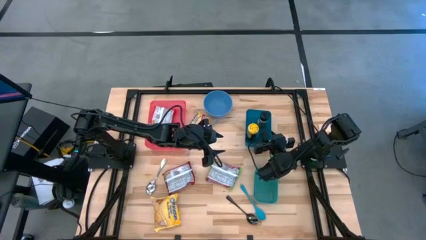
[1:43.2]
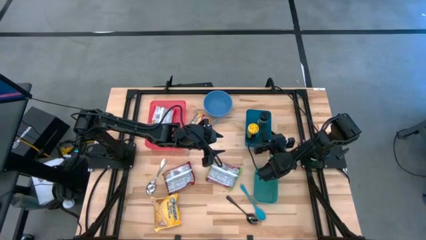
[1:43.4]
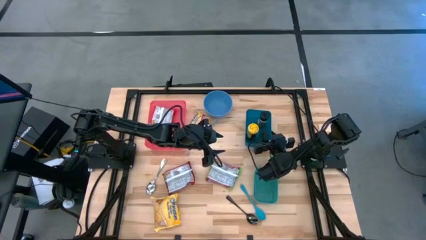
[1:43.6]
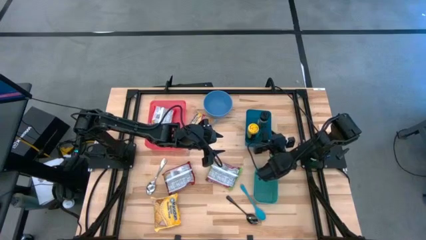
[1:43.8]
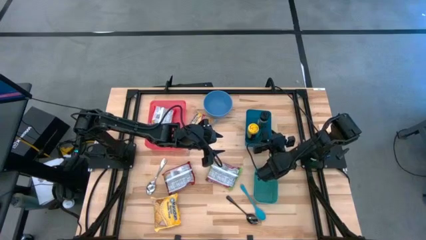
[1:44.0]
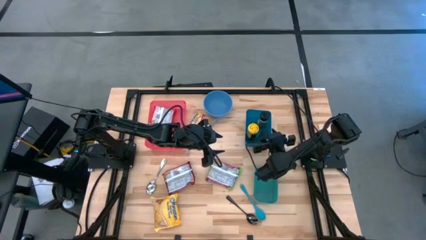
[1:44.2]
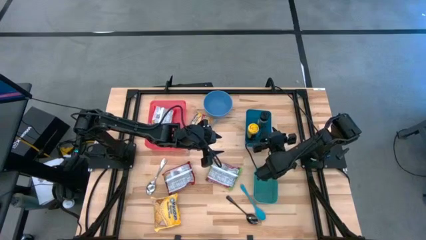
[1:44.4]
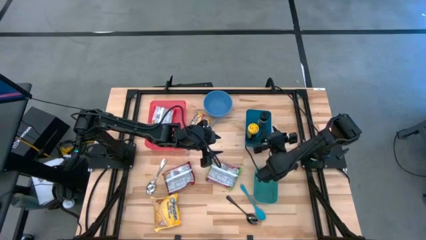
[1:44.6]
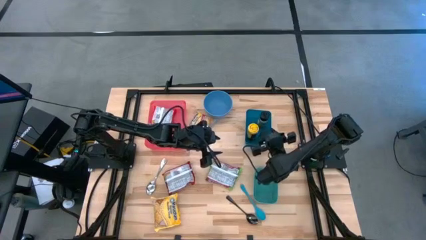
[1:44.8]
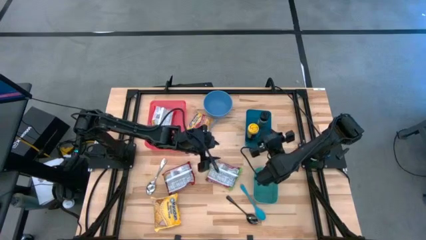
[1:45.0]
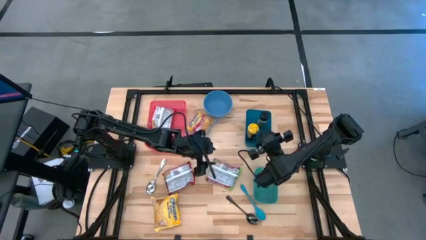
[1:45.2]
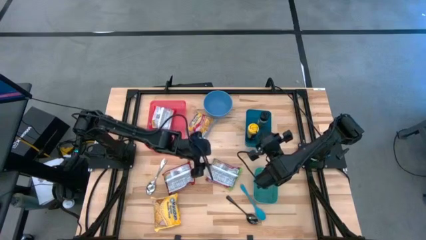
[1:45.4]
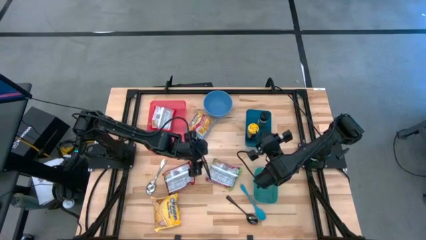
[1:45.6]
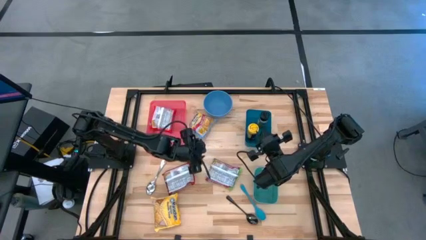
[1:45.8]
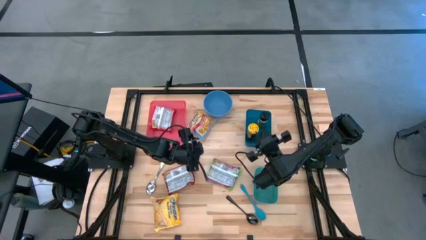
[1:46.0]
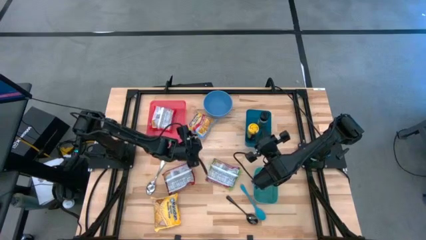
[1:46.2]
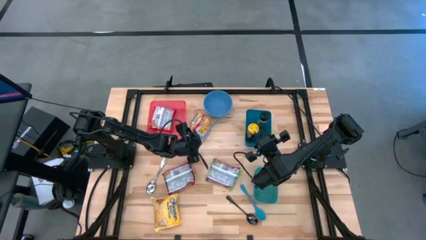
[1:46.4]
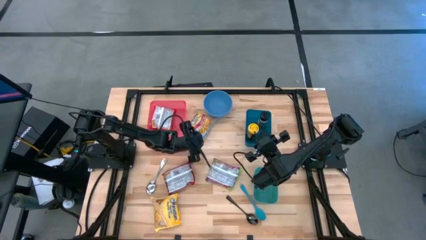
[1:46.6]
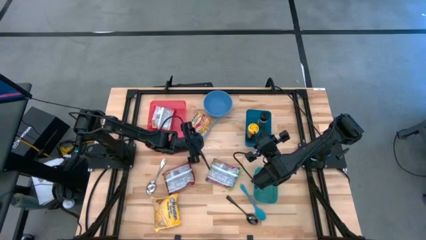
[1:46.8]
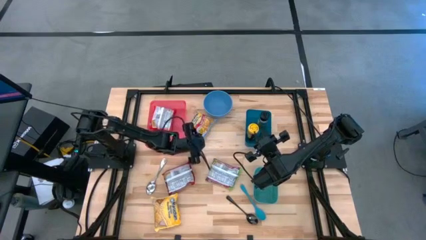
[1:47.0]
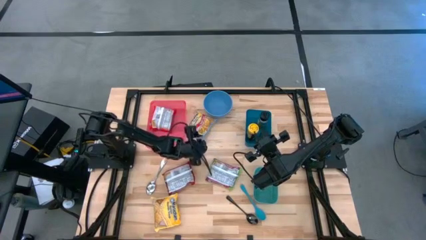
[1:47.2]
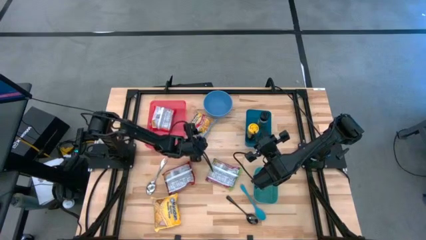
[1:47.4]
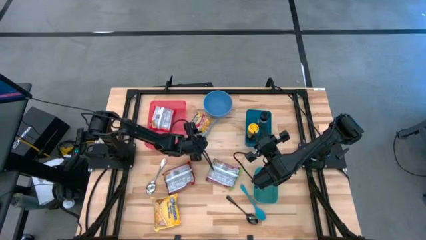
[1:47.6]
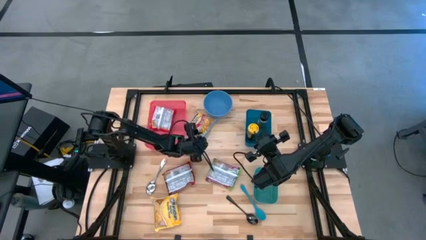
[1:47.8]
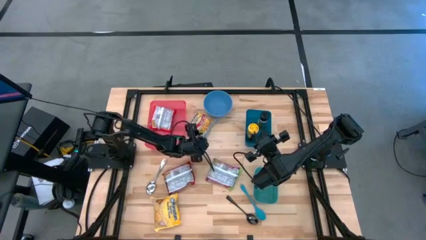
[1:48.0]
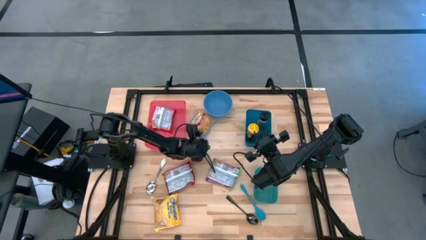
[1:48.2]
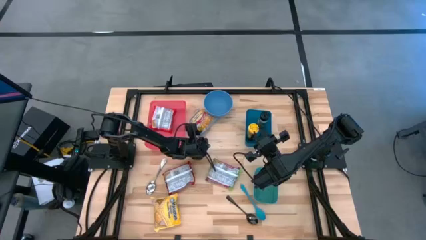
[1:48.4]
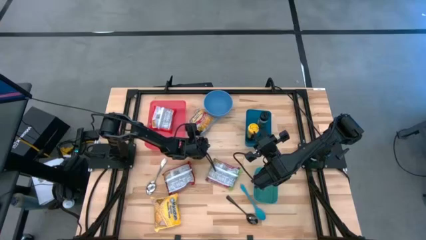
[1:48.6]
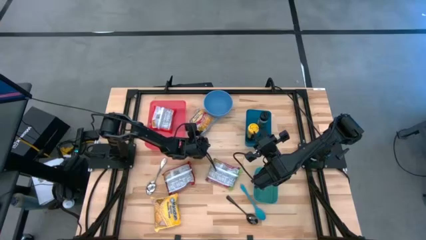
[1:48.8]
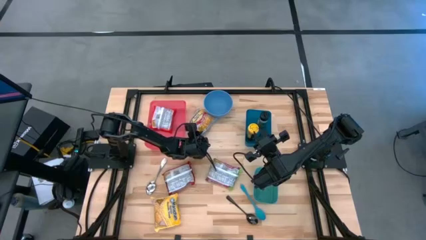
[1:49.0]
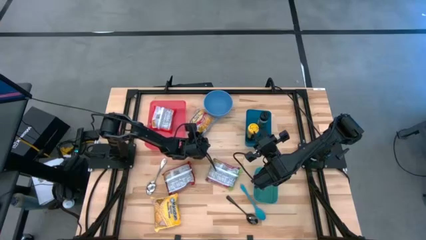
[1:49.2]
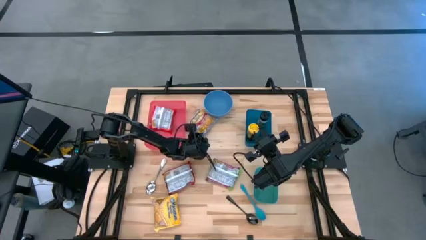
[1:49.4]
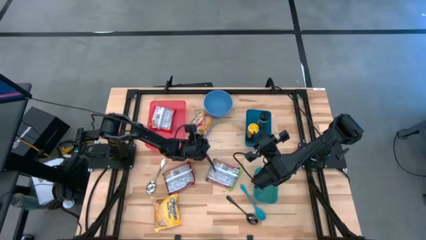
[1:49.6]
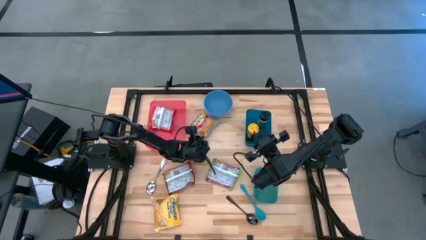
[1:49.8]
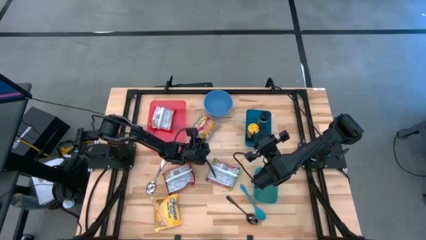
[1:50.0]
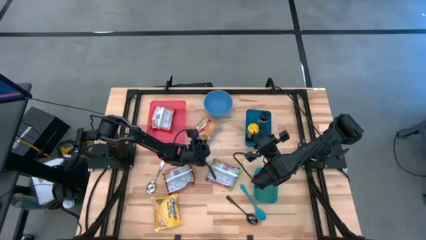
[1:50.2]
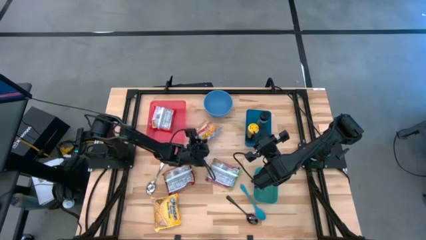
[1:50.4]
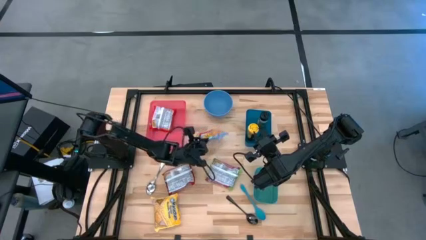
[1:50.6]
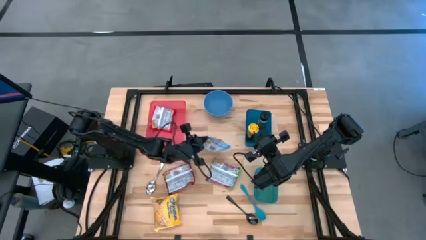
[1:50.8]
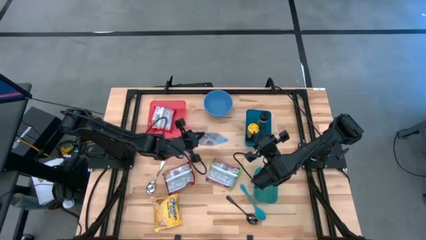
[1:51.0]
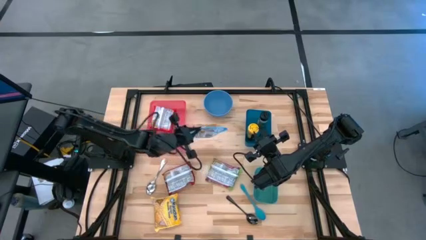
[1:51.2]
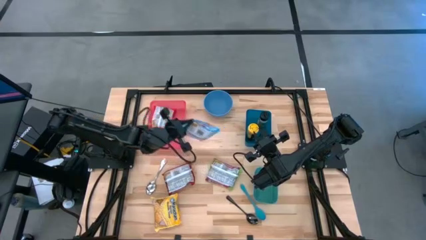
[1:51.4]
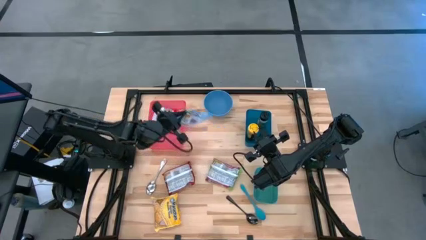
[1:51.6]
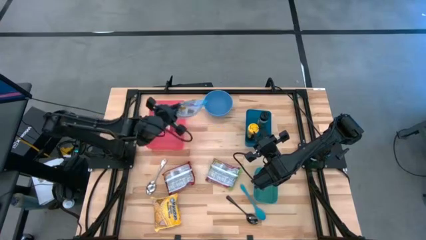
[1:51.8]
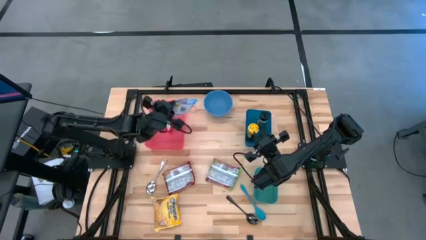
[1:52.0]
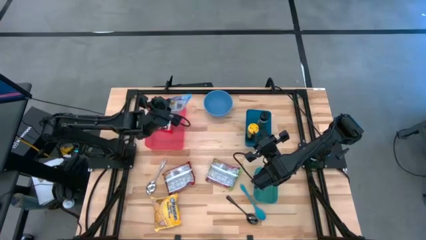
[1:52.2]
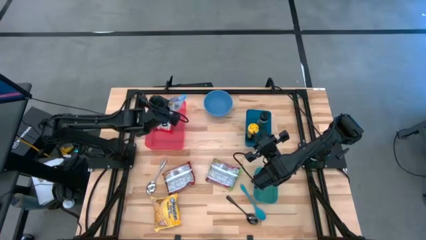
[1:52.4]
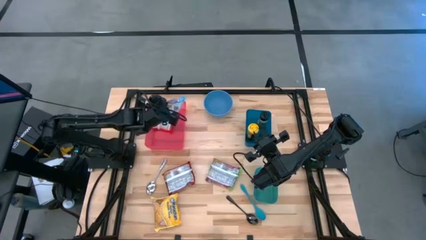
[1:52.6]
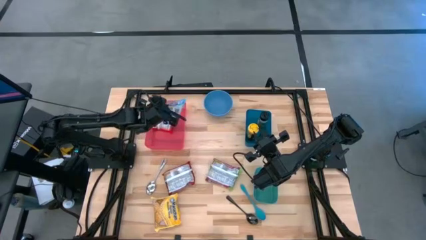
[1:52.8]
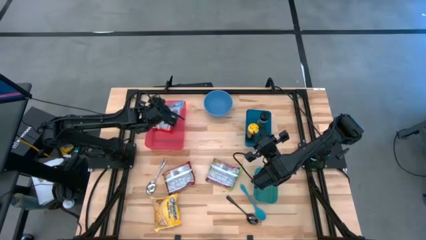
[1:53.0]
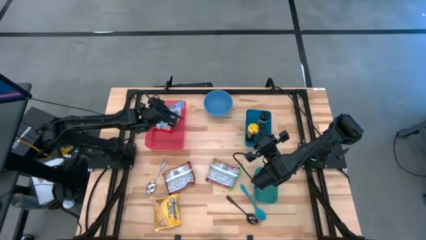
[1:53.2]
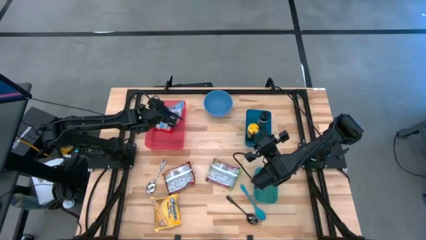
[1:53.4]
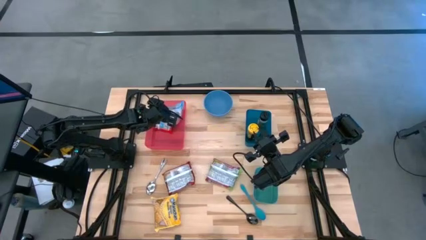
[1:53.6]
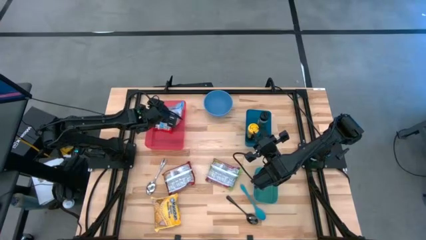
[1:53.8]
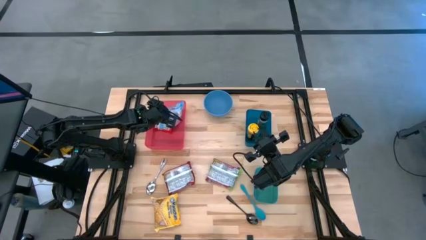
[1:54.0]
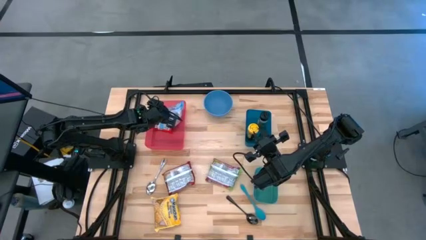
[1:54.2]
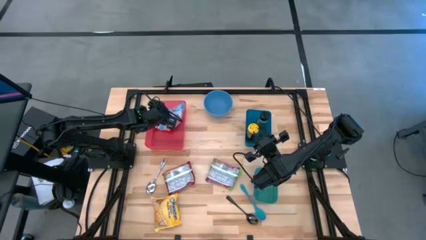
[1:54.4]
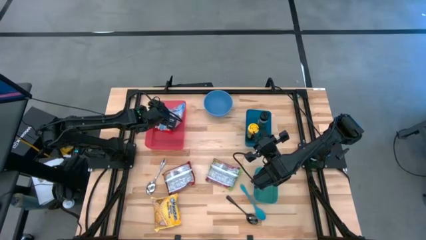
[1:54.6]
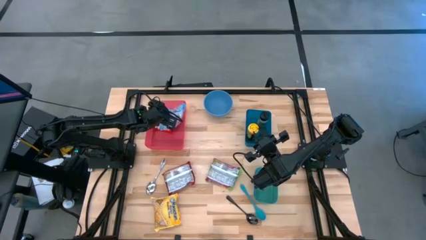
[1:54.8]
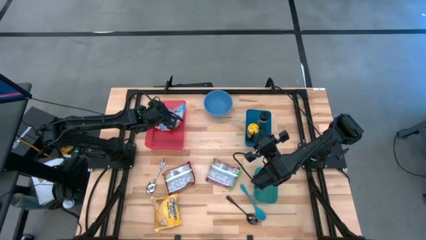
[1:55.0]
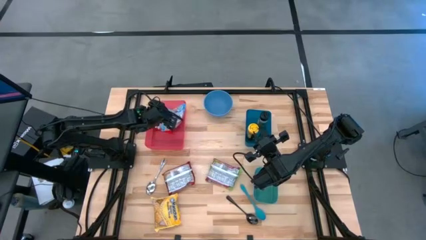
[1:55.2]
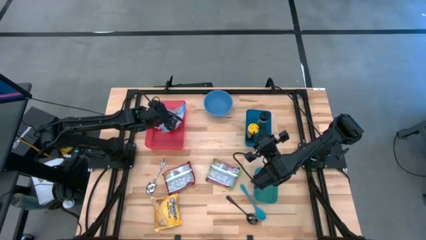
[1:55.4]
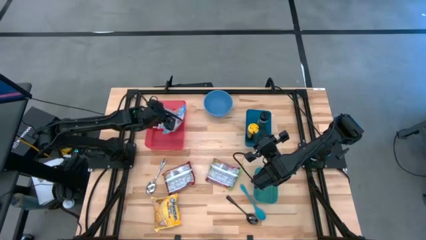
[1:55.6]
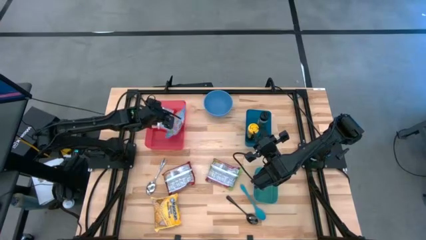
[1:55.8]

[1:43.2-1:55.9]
Task: Pick & Place Food Item
Put the blue noodle pack into the red bin

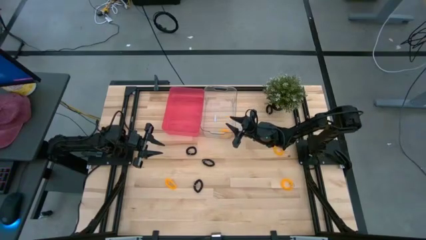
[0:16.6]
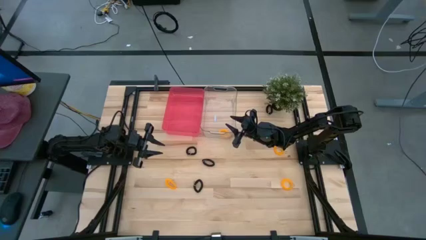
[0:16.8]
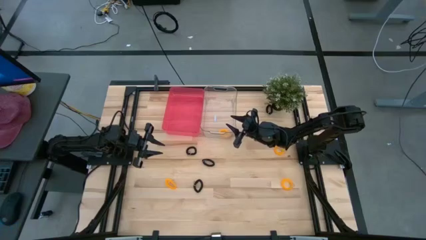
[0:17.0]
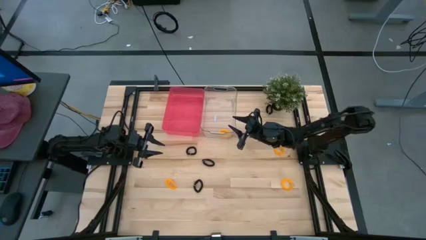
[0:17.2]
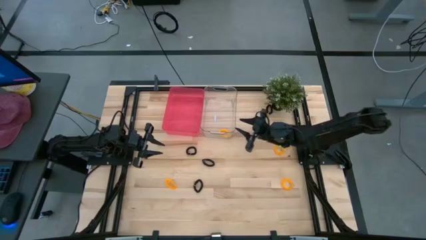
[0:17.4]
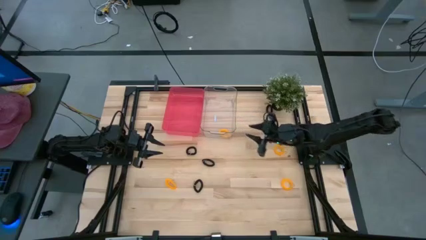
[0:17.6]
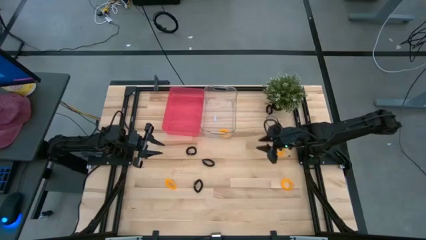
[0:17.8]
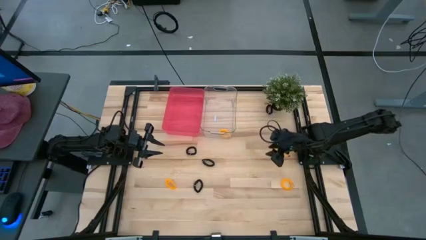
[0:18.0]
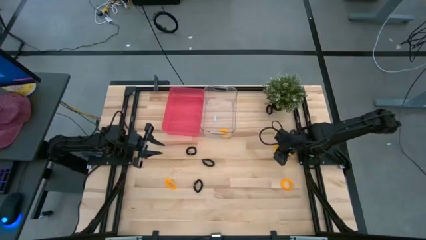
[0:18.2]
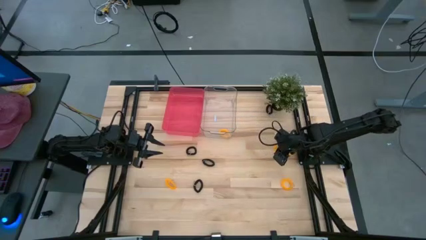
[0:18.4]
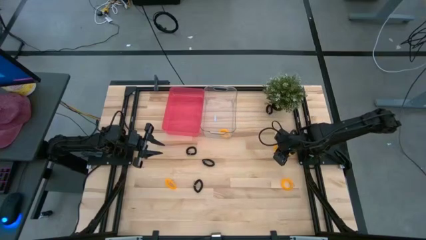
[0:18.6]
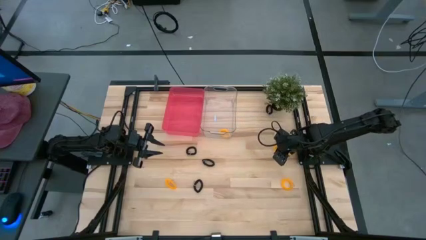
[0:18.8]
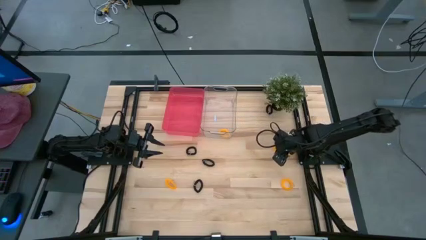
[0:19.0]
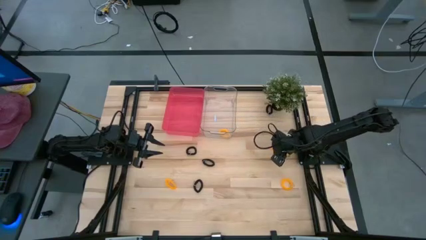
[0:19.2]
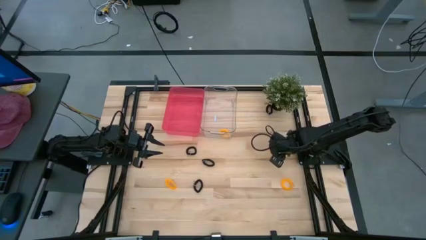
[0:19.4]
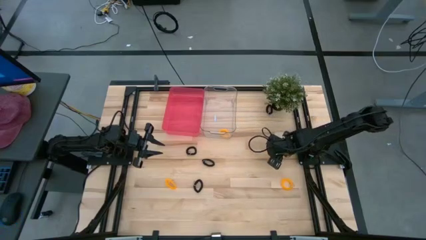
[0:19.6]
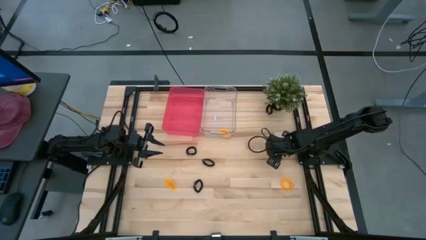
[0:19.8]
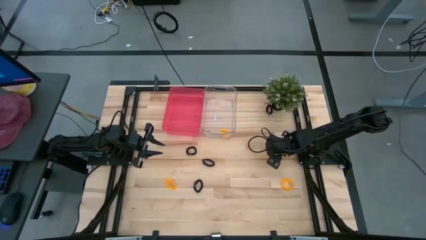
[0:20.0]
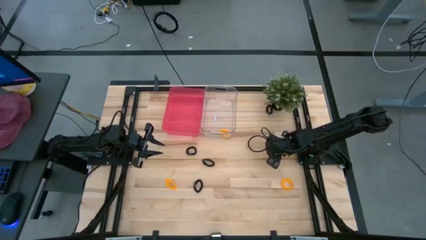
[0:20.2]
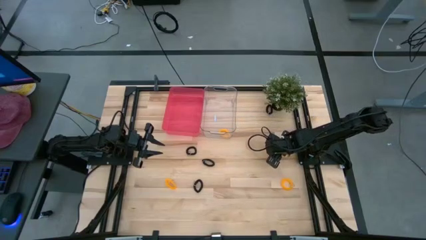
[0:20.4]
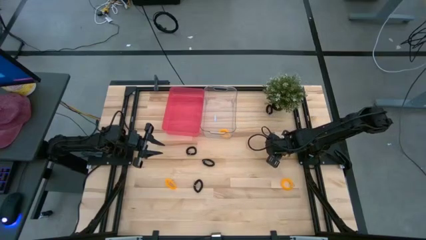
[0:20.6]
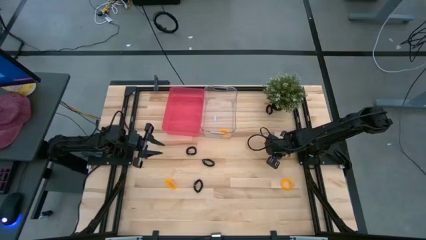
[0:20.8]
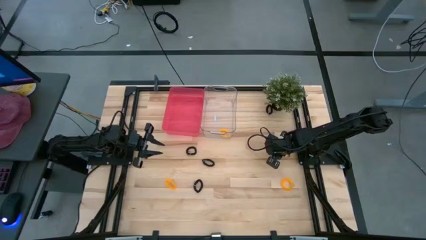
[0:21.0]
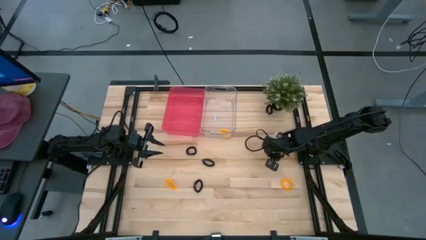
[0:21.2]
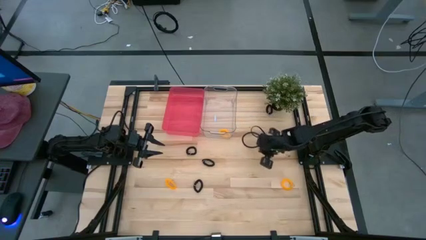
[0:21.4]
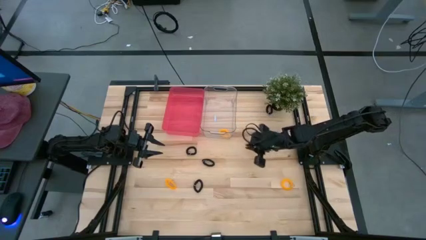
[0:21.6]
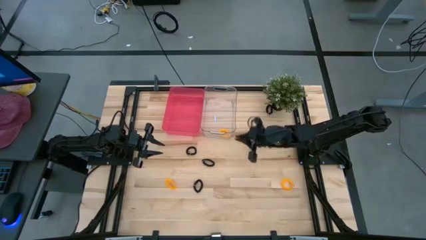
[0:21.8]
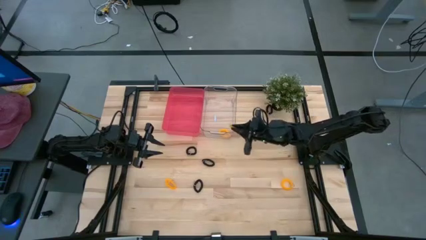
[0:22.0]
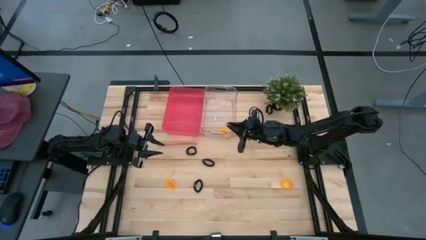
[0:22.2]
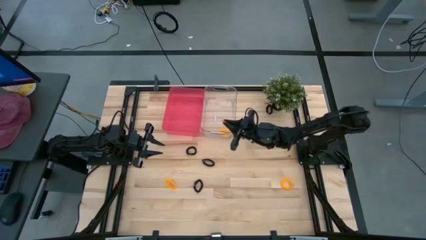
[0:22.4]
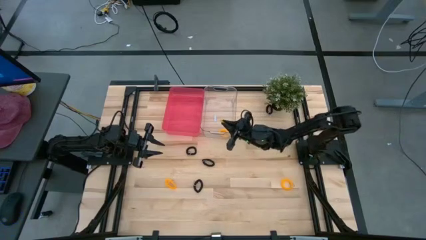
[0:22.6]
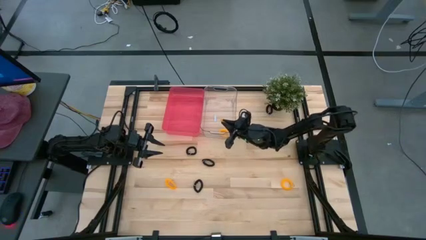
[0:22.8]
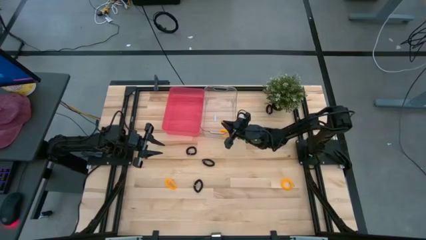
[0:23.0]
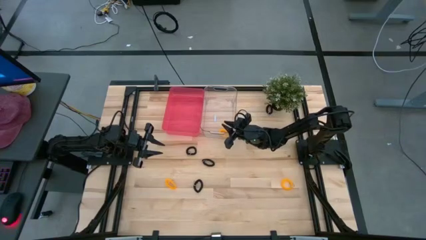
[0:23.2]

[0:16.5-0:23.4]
Task: Sort spring keychains
Put the orange spring keychain into the transparent bin
